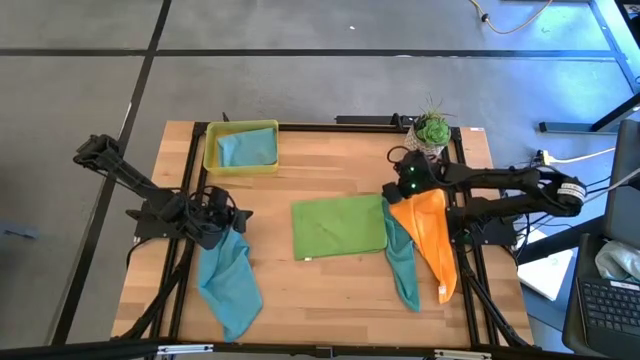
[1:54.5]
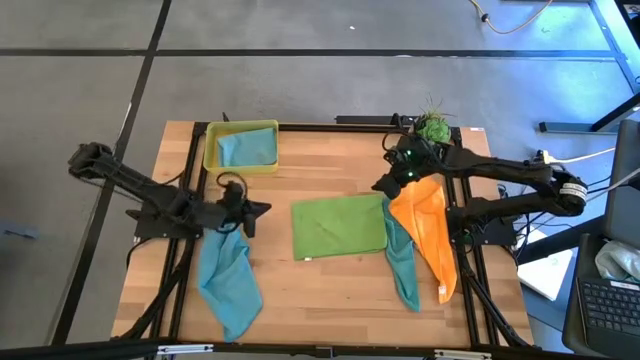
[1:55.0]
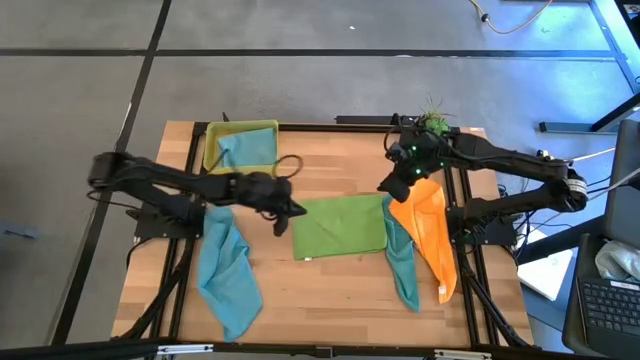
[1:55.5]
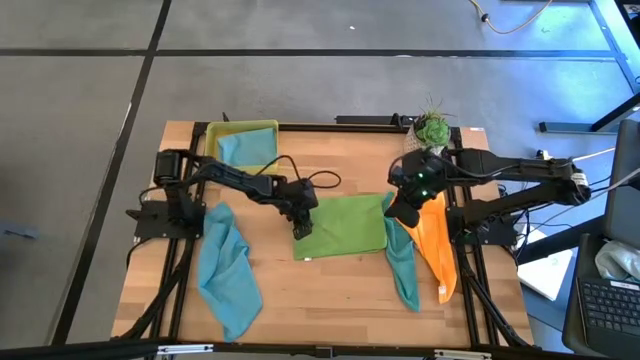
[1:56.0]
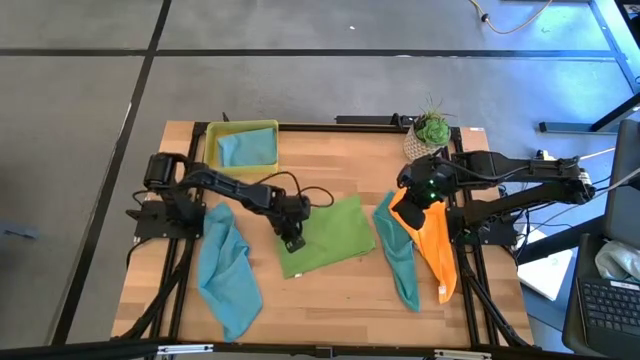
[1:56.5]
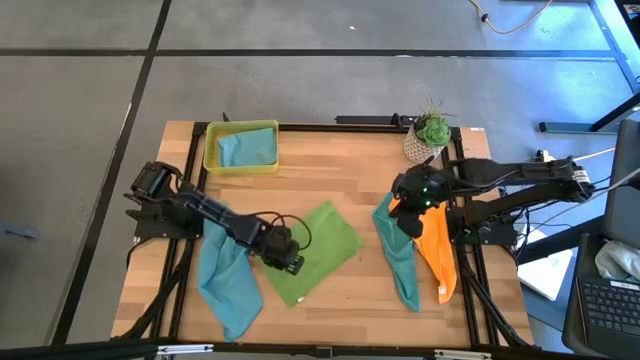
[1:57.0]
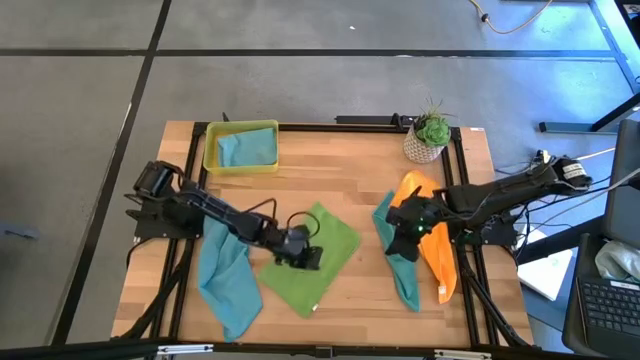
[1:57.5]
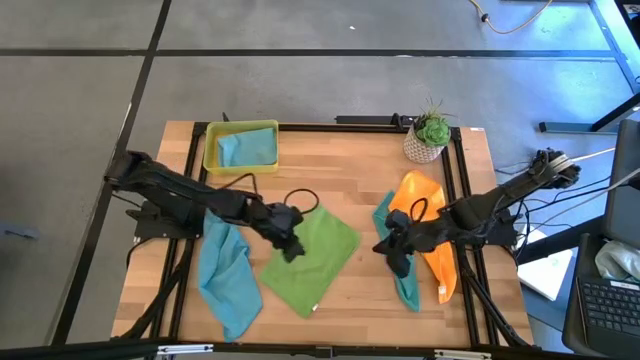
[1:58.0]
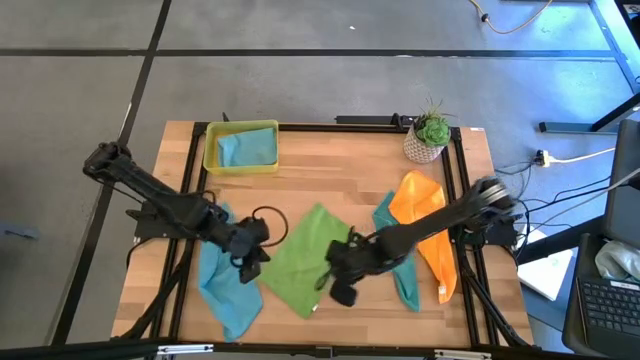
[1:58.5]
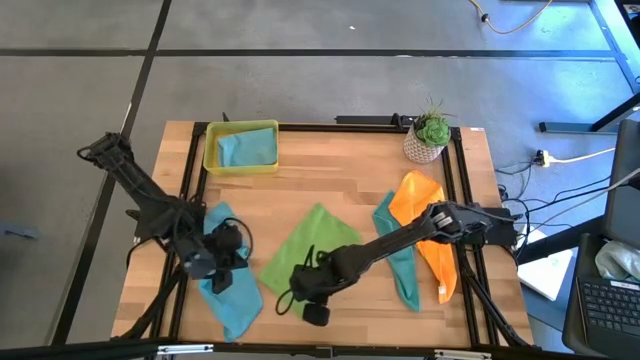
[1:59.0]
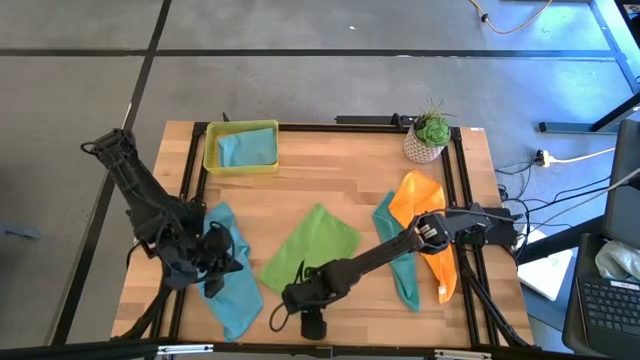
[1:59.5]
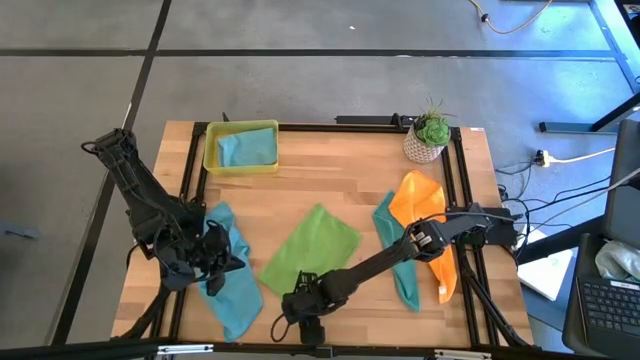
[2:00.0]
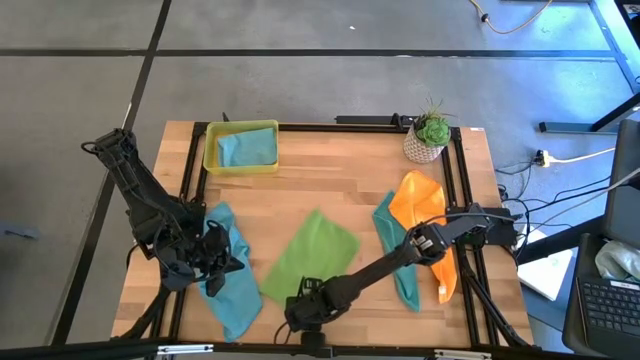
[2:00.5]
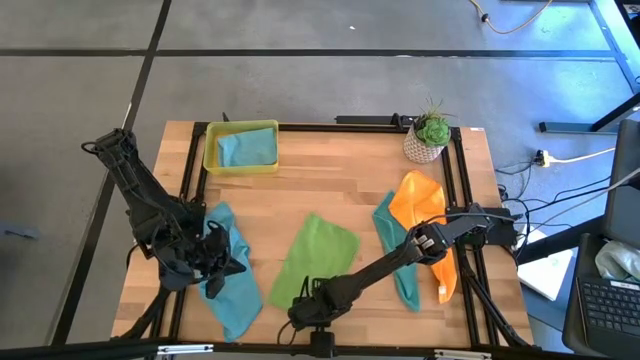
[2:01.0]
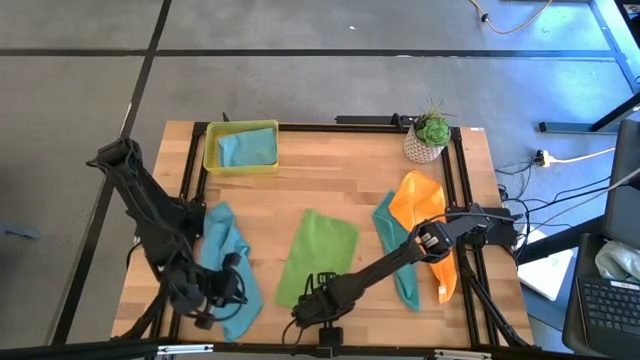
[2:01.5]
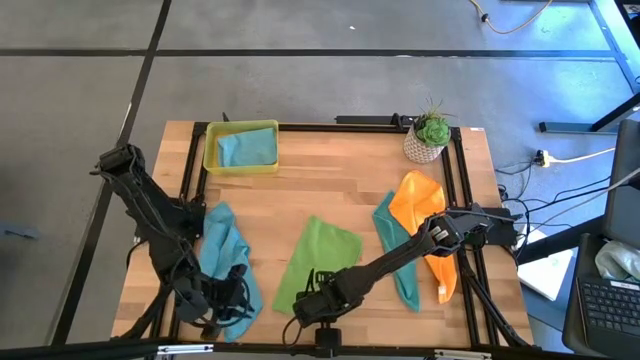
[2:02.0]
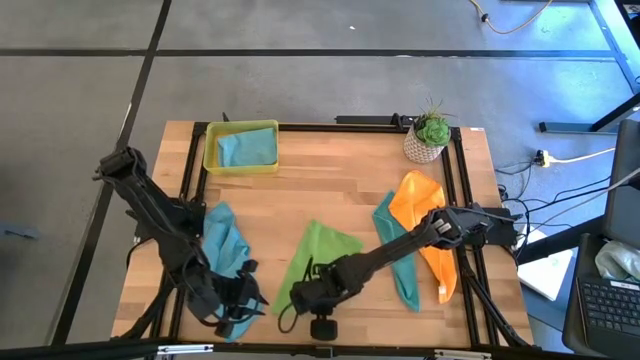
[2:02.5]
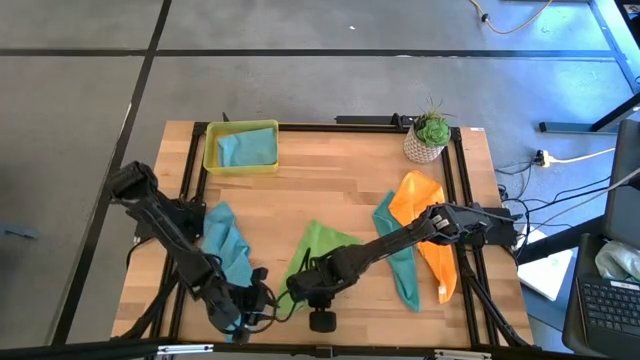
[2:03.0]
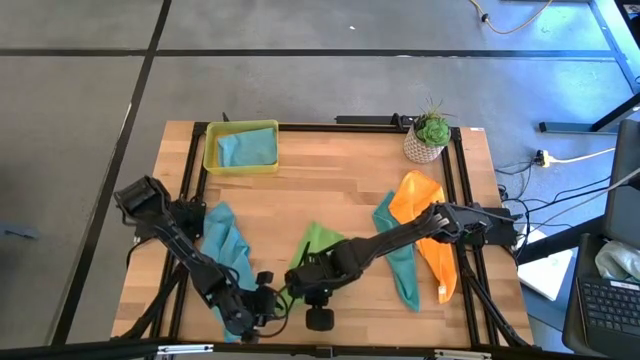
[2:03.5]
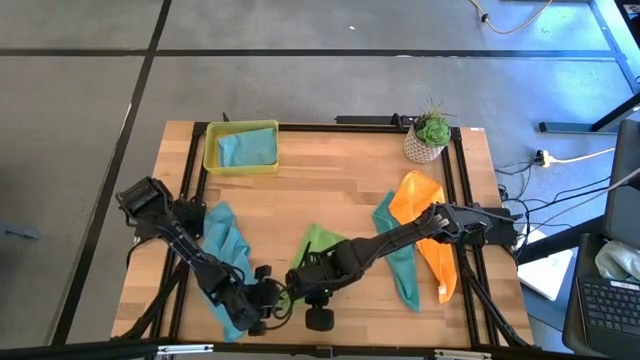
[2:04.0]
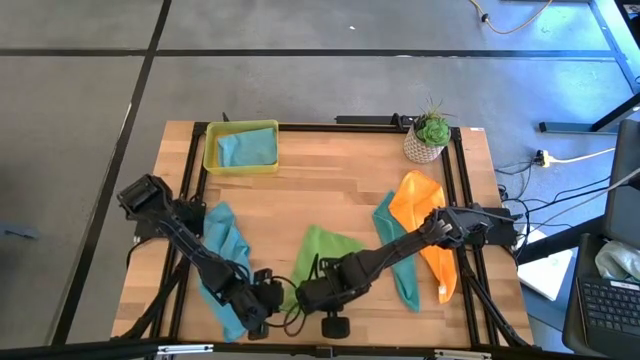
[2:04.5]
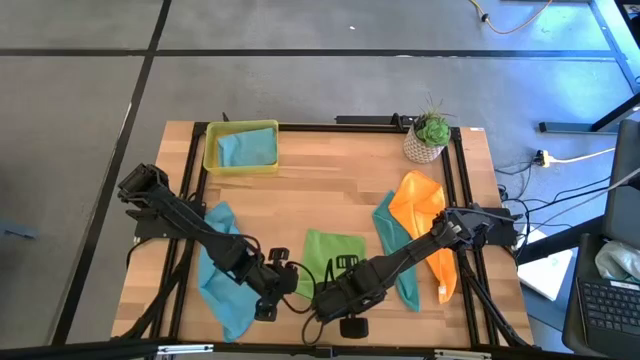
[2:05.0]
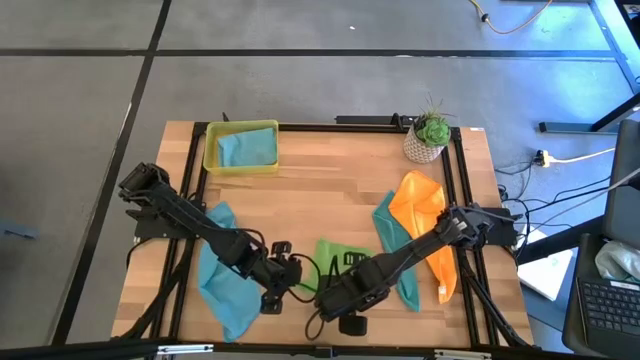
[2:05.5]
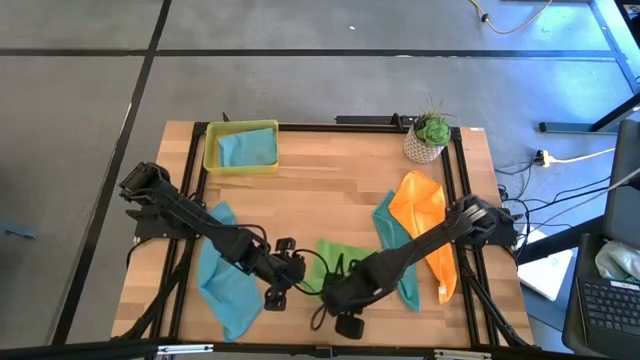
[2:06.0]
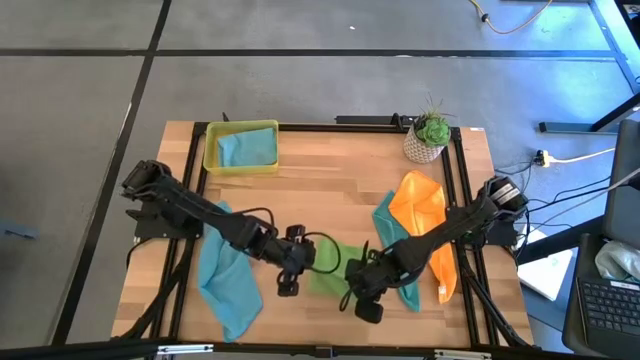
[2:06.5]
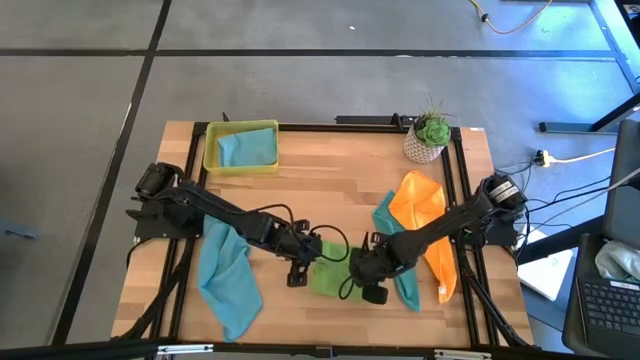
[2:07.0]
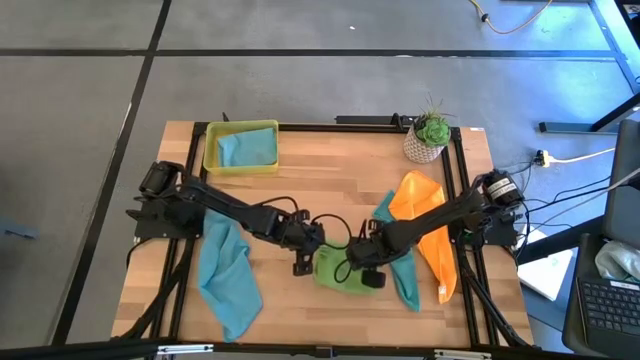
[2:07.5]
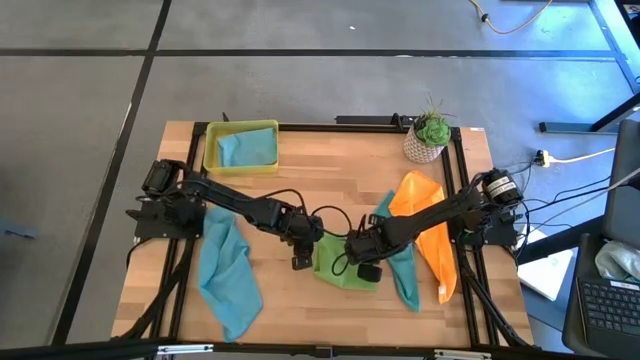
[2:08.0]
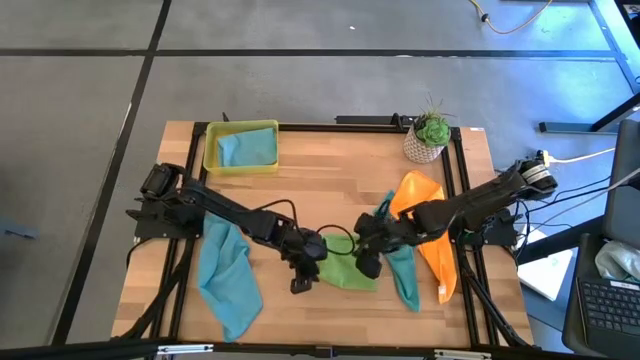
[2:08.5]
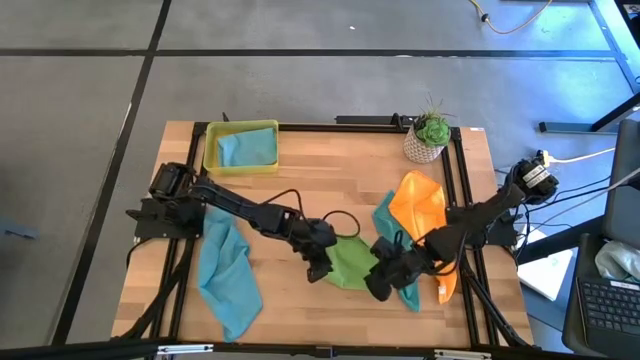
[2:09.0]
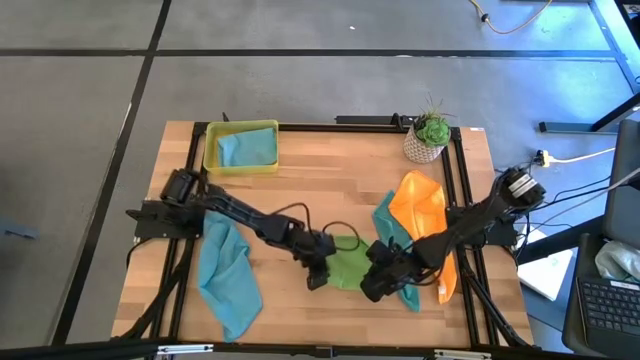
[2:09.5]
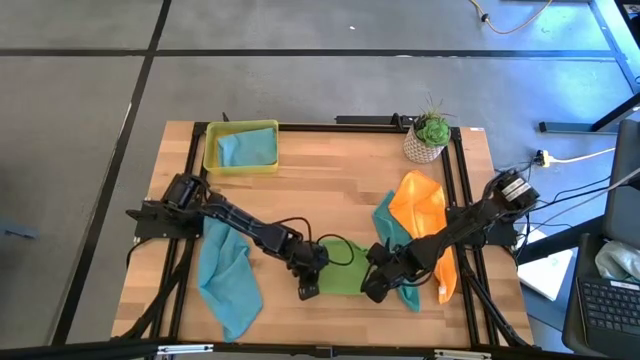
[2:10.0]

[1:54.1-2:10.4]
Task: Fold microfiber towels
Fold the green towel

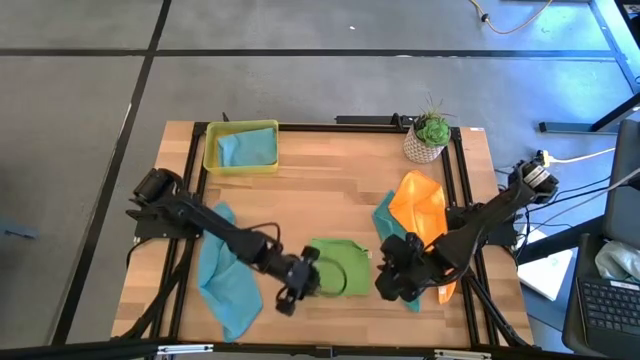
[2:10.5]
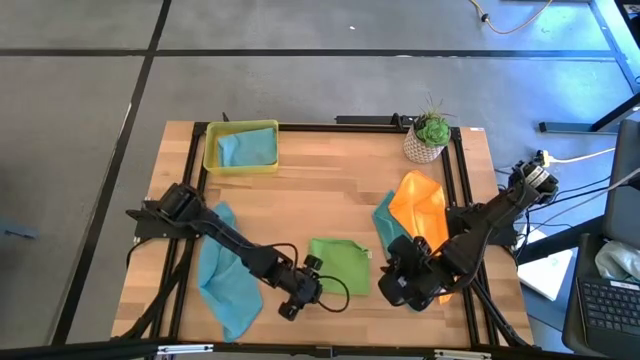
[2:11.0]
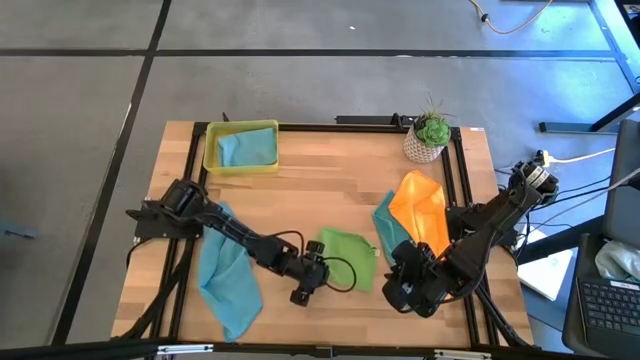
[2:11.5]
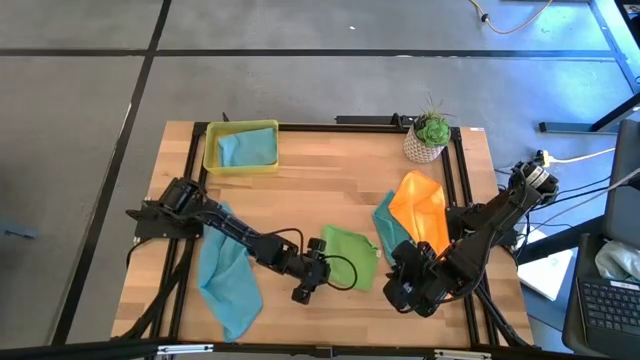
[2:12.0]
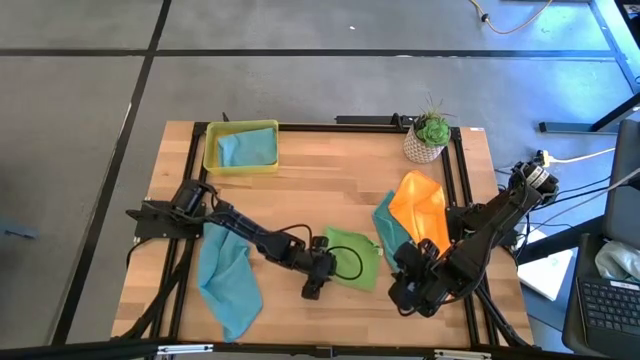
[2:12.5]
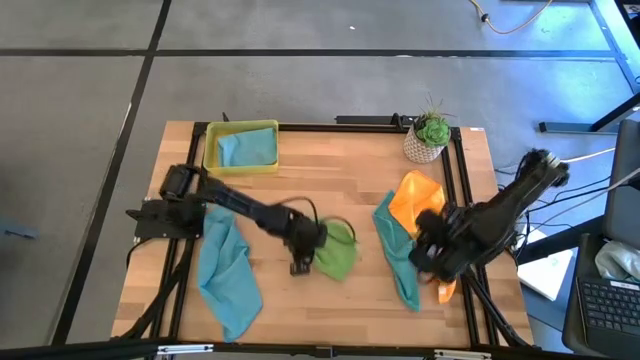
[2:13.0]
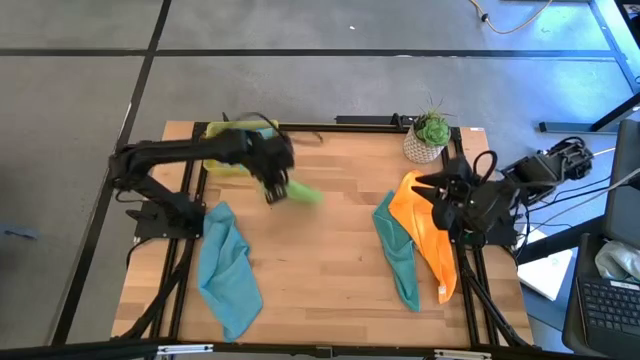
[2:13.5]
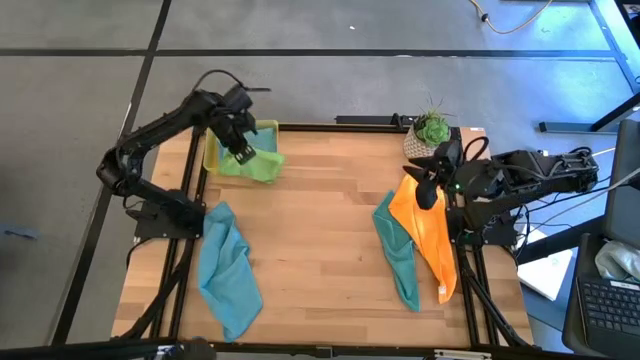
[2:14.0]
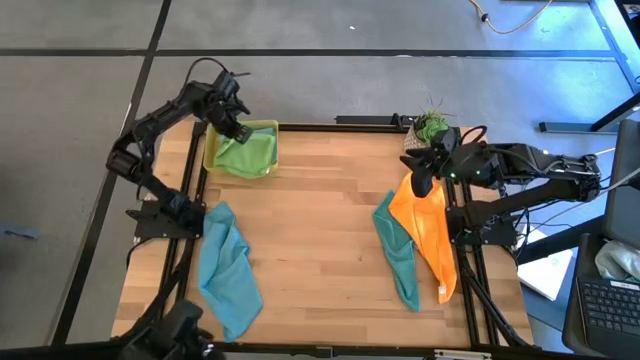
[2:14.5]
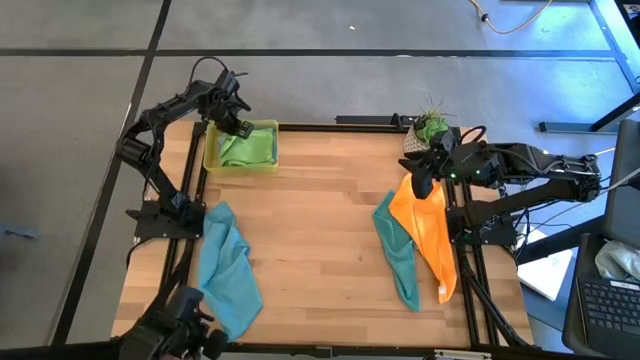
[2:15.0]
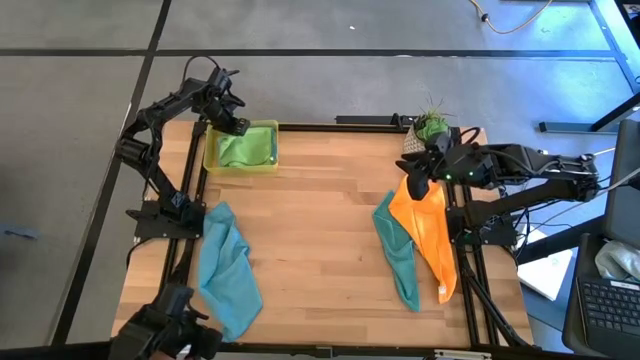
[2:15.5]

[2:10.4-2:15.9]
Put the folded green towel into the yellow bin
